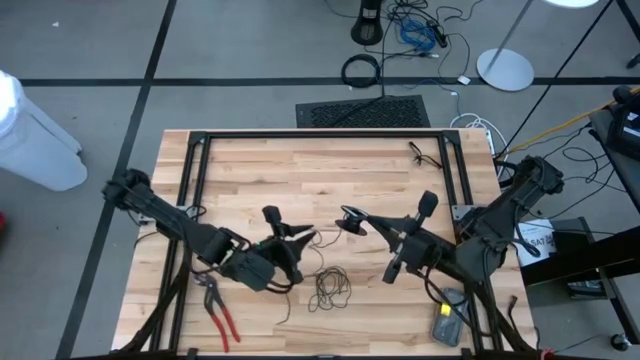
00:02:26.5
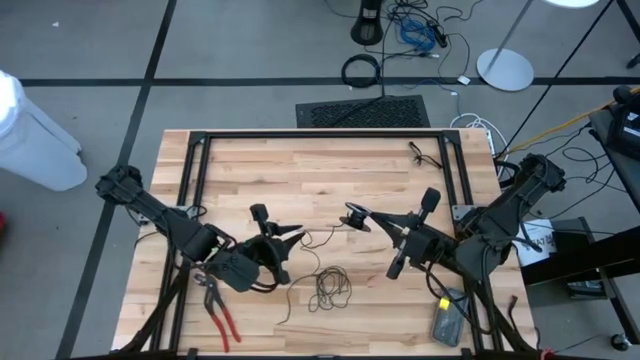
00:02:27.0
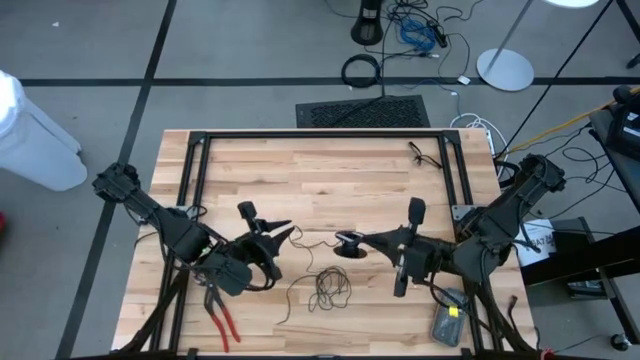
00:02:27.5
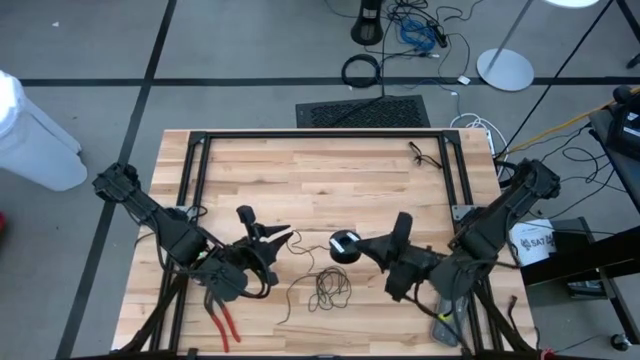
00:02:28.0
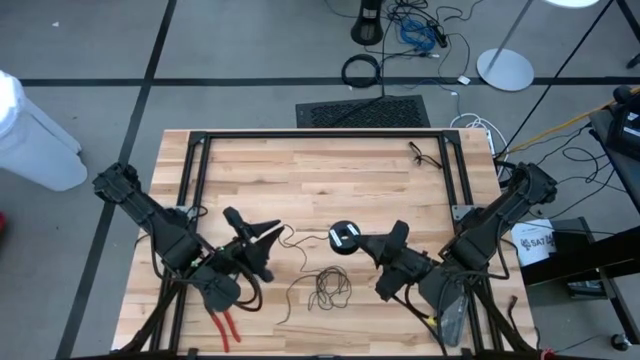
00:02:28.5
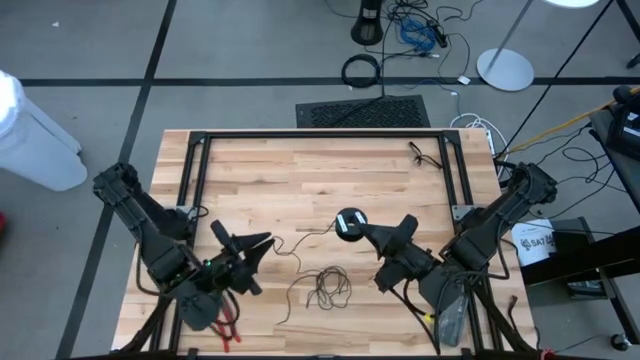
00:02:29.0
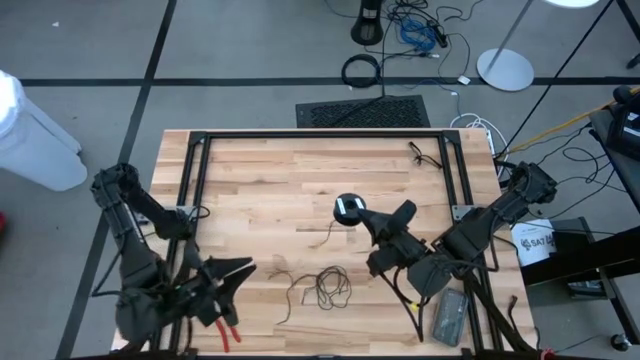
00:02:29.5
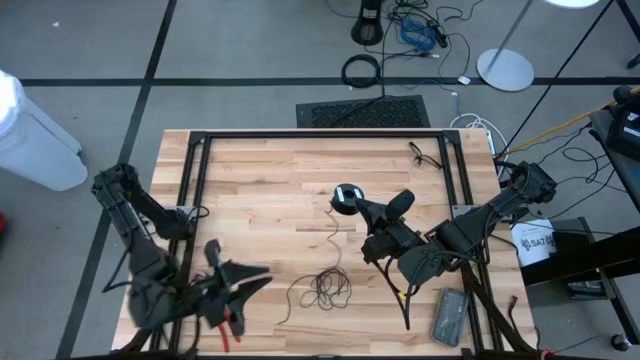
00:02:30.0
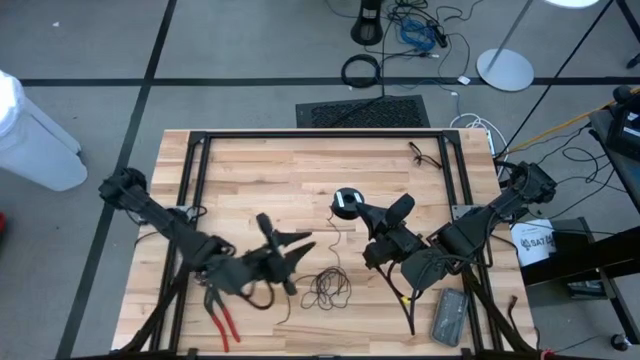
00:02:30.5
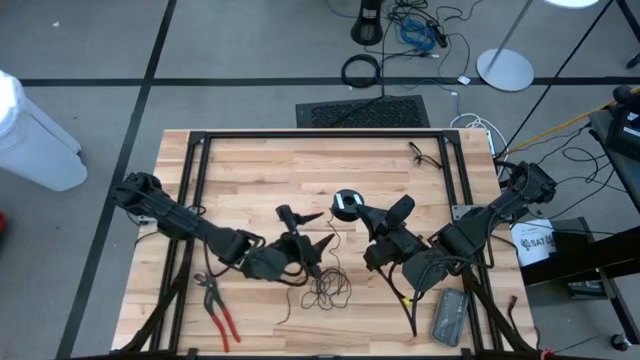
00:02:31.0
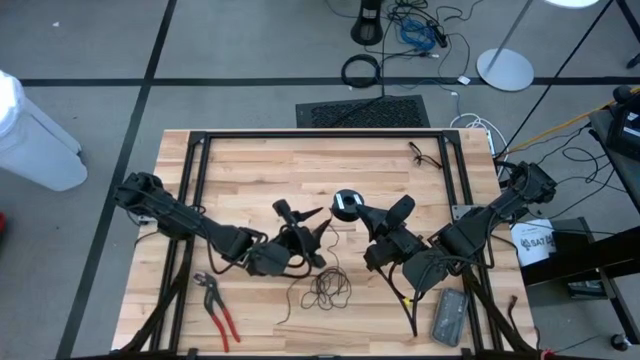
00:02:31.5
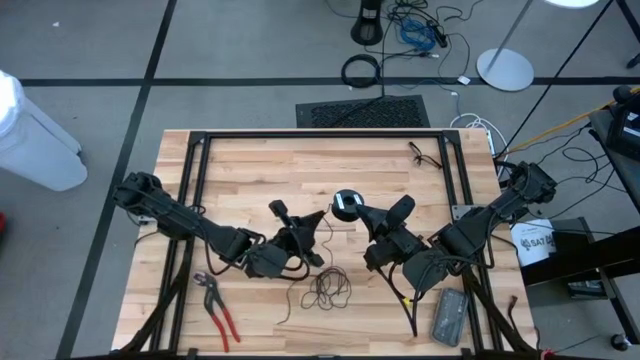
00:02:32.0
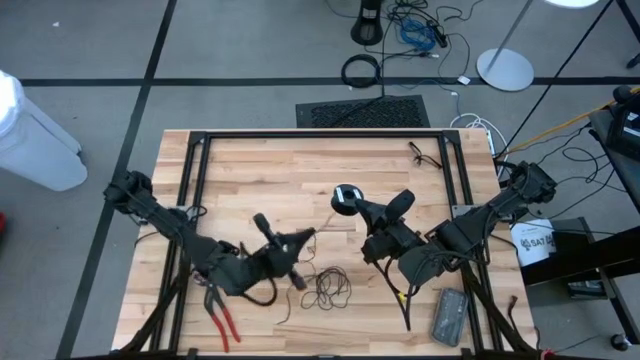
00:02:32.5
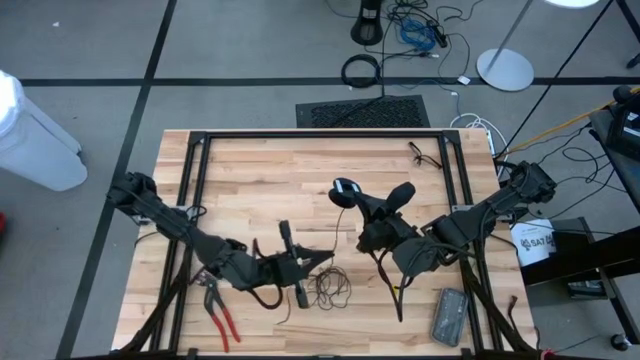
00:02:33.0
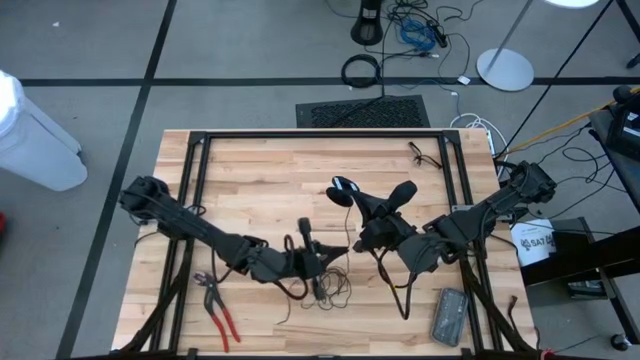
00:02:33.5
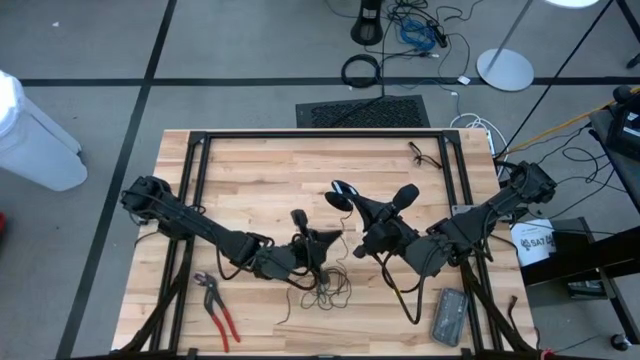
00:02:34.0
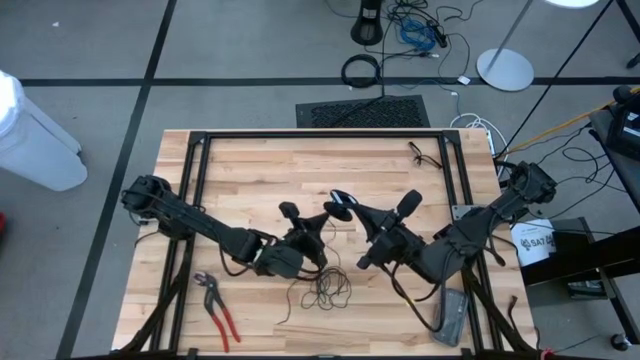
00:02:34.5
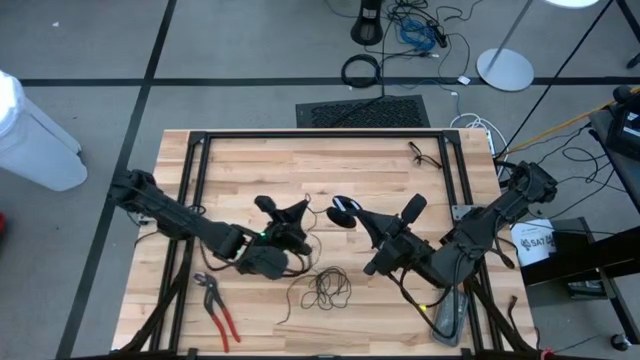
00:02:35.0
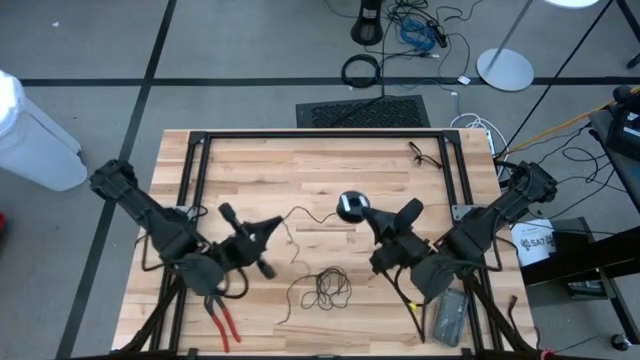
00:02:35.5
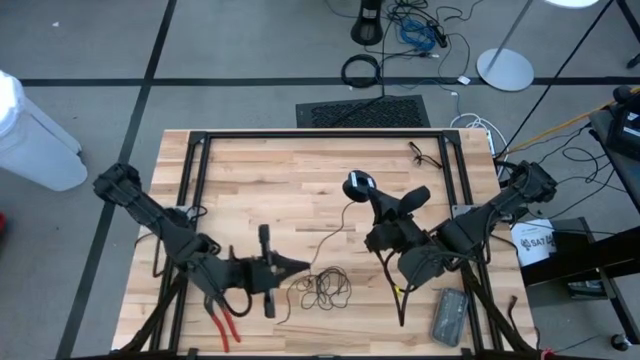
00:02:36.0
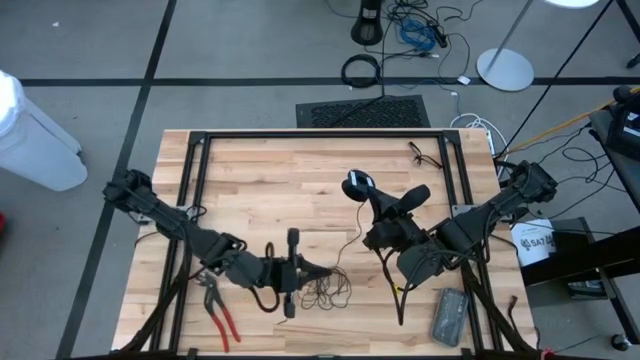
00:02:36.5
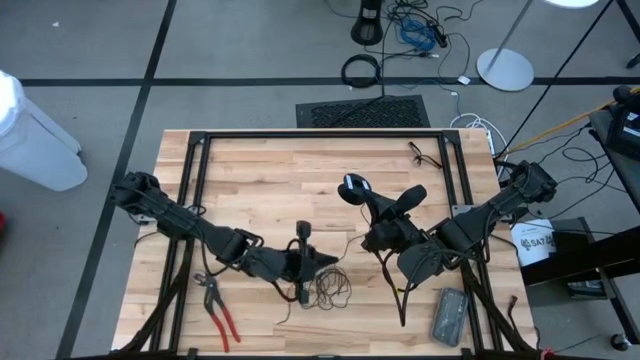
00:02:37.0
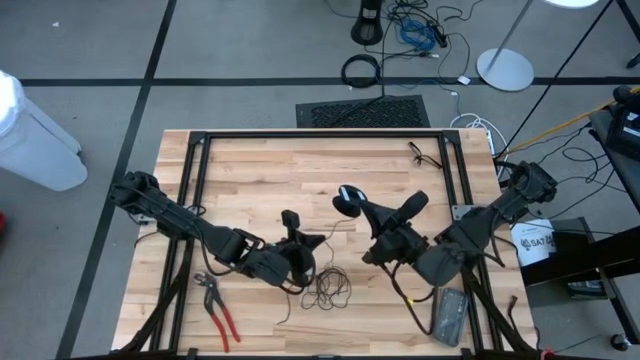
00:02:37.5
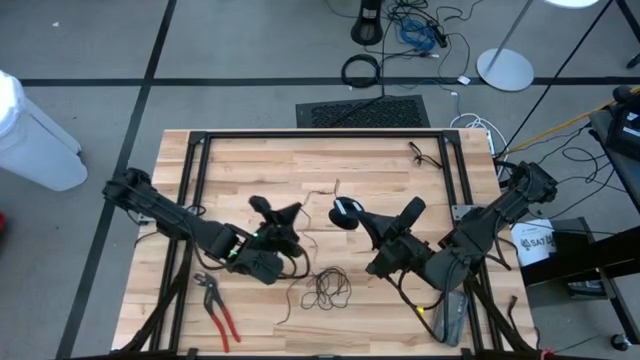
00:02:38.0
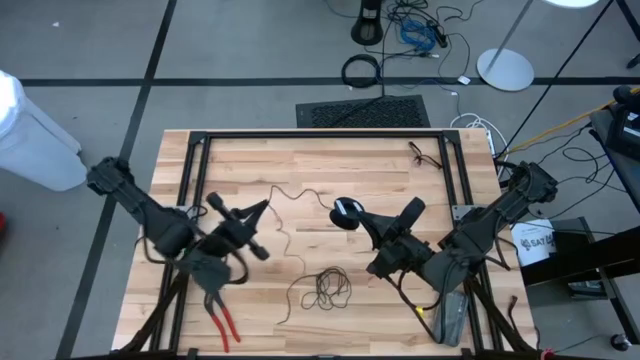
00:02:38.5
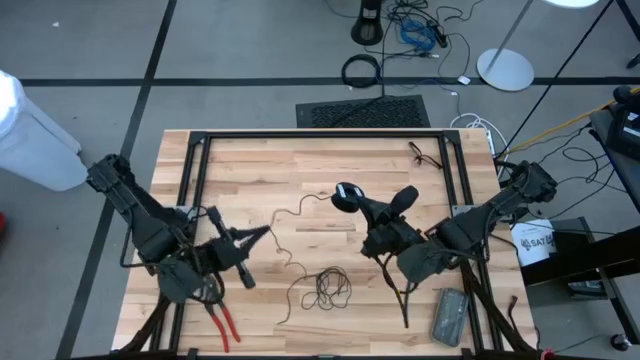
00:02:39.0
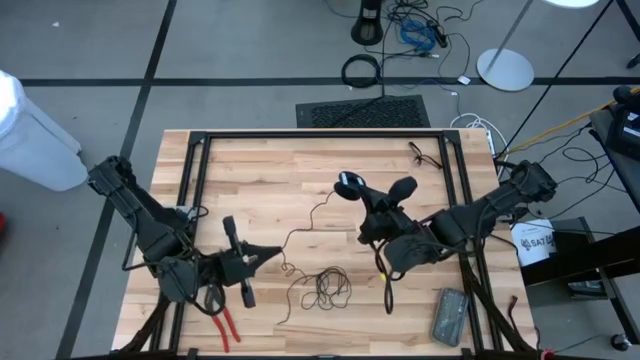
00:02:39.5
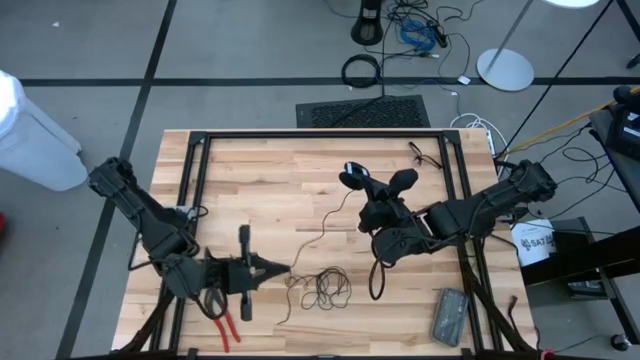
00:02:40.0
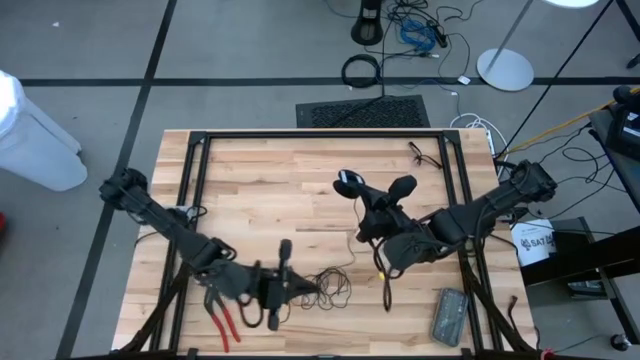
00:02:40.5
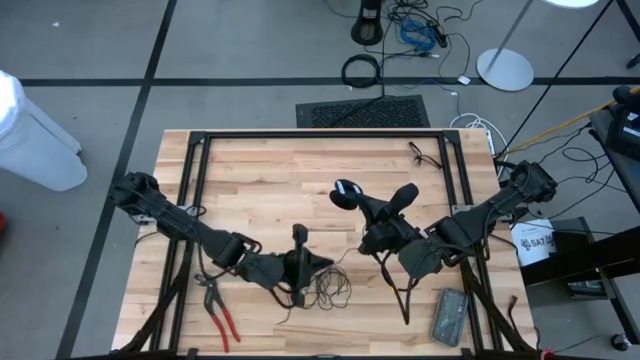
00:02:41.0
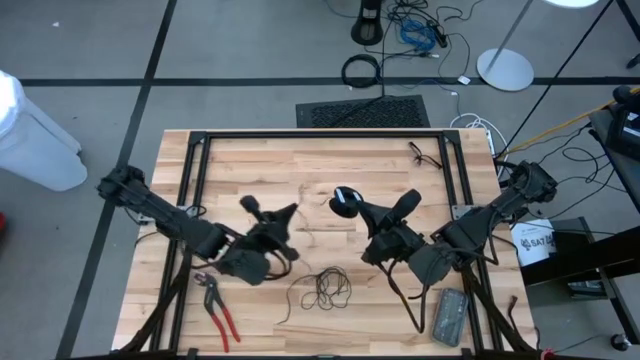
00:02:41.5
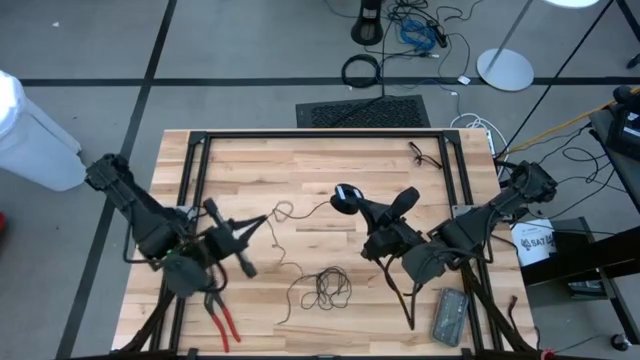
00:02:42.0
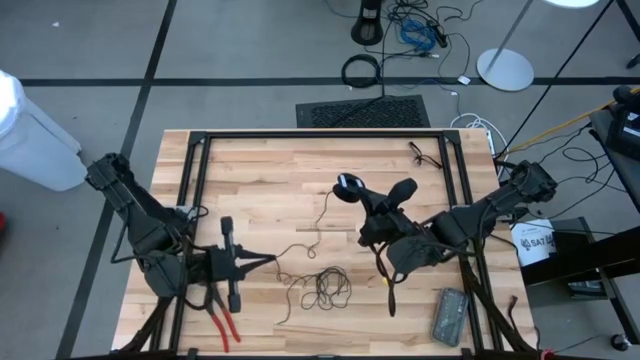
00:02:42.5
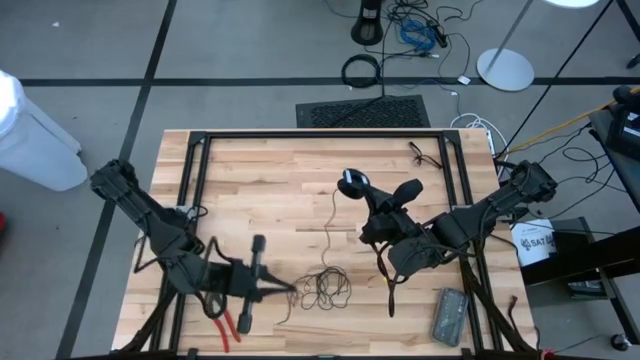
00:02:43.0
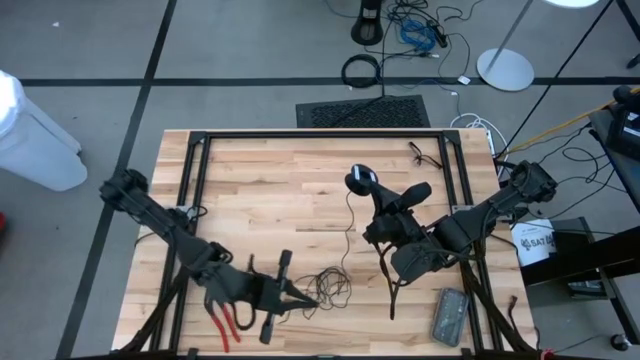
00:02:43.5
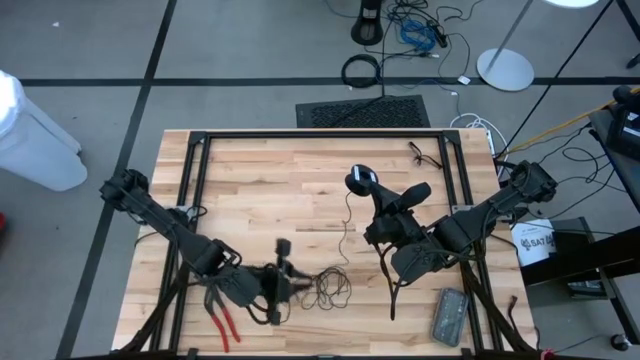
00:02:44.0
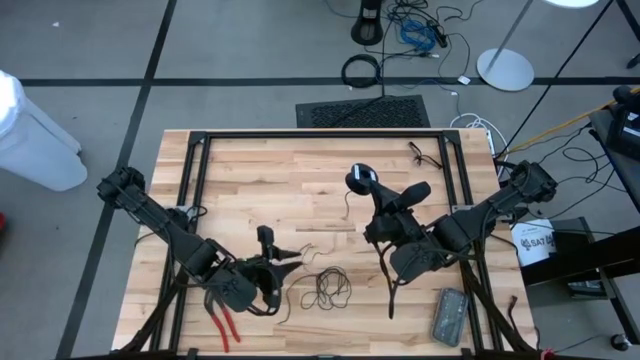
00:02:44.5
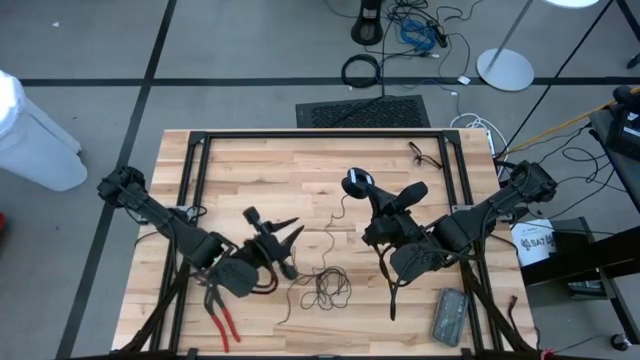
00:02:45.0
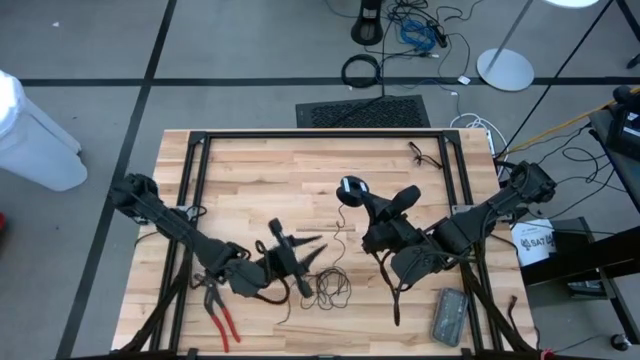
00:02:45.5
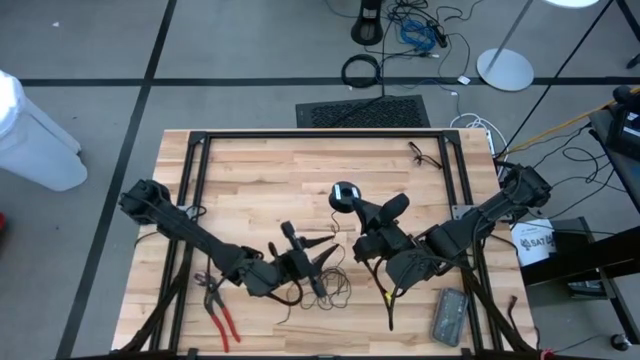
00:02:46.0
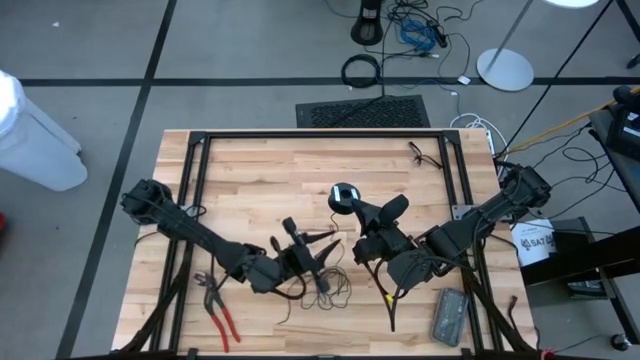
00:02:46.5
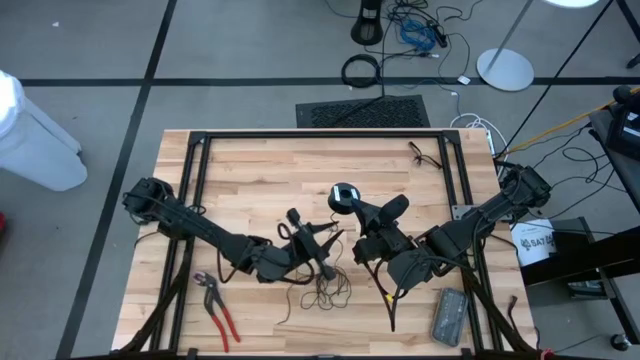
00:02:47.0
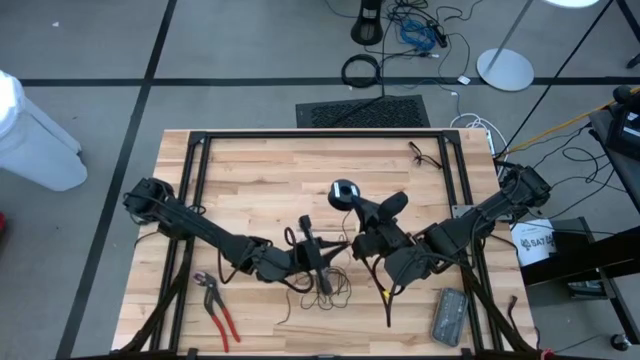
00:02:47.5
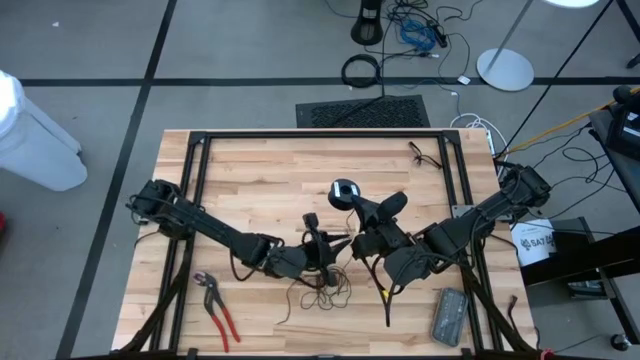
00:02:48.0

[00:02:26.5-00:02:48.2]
Task: Coil cords
Uncoil the black wire from the black spool
